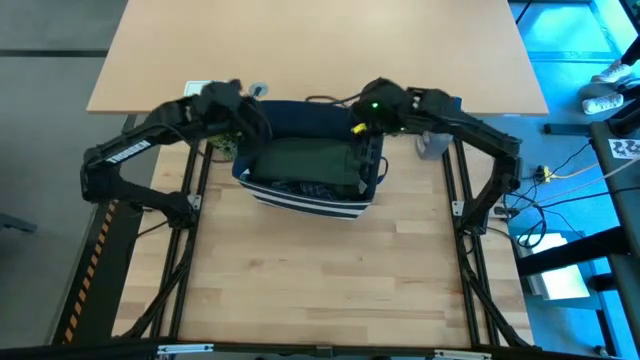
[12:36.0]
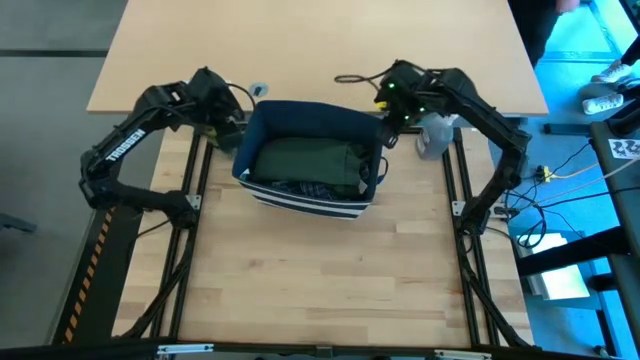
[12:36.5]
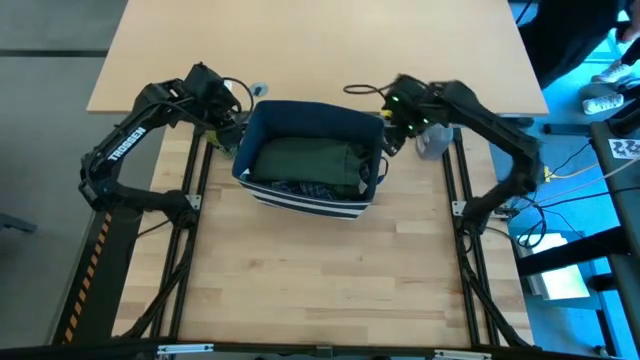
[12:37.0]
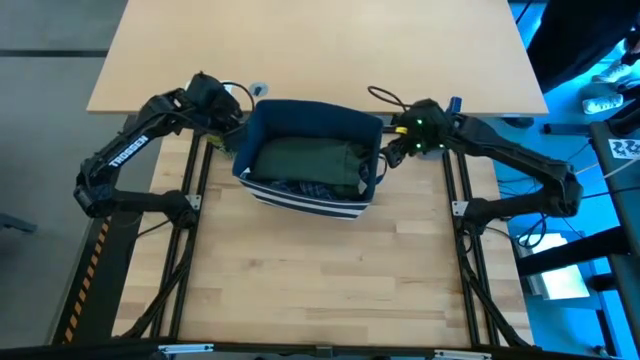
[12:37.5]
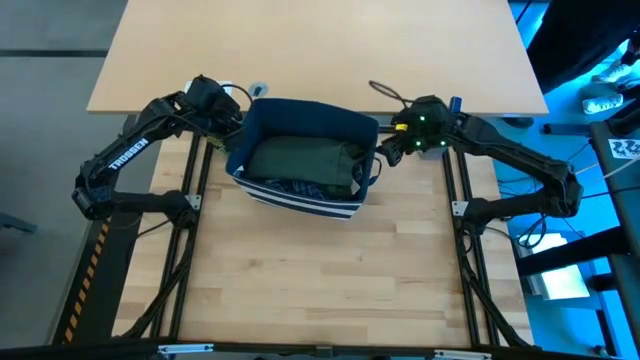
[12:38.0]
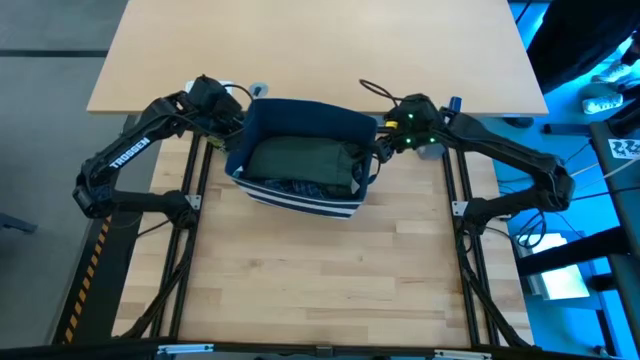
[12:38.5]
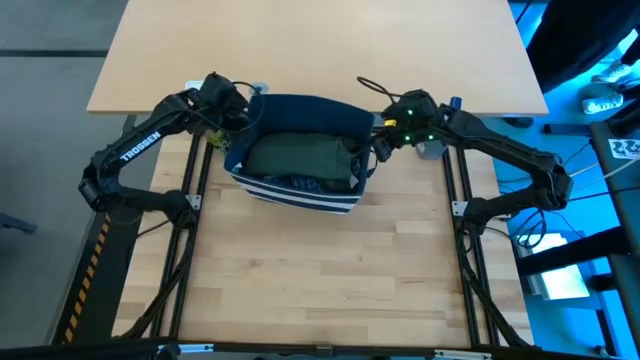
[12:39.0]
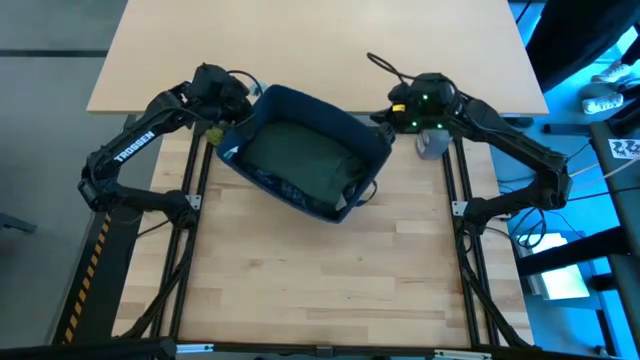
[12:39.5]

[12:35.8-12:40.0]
Task: Fold Laundry from Bin
Move the laundry bin to the other table

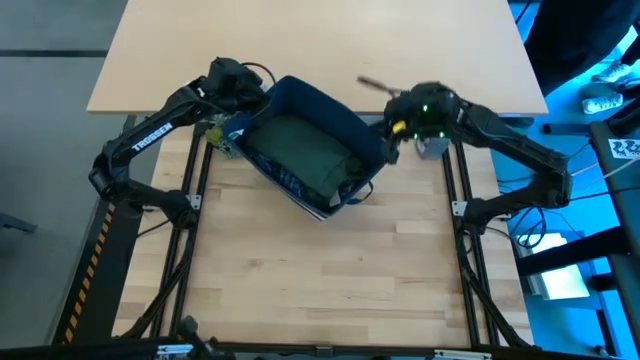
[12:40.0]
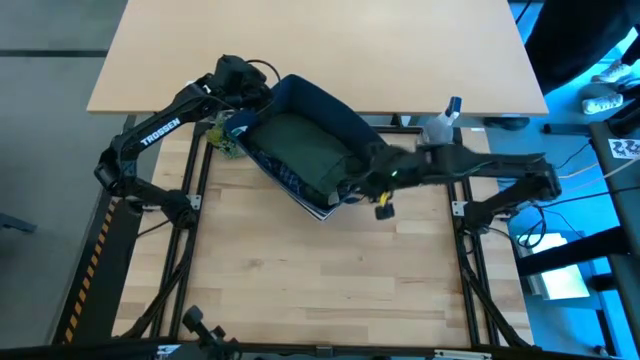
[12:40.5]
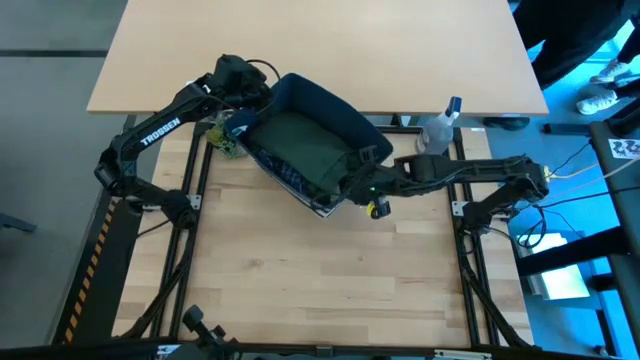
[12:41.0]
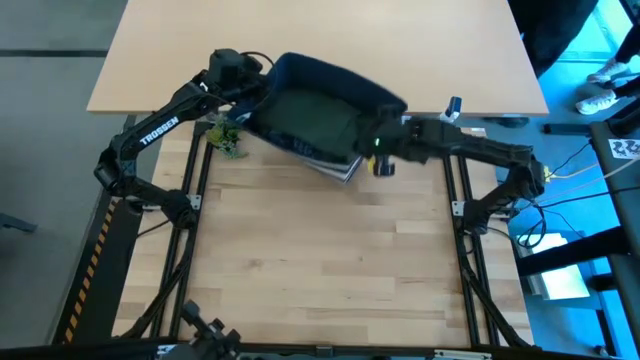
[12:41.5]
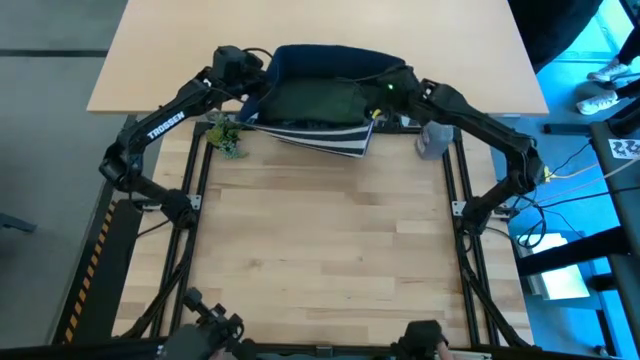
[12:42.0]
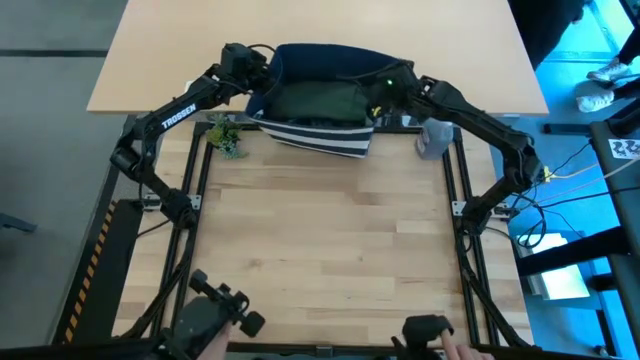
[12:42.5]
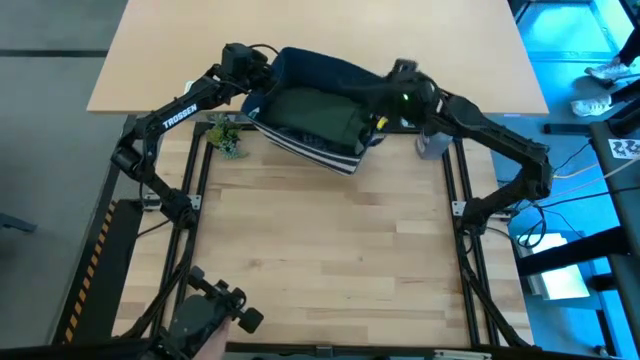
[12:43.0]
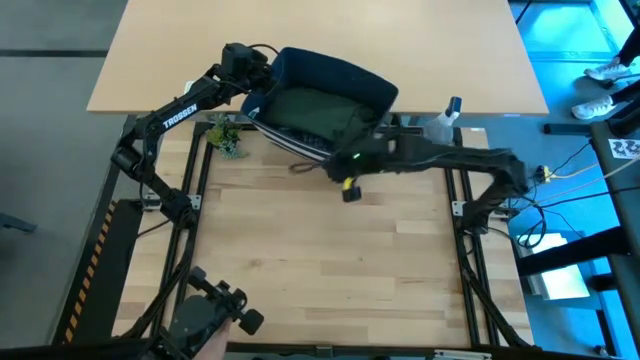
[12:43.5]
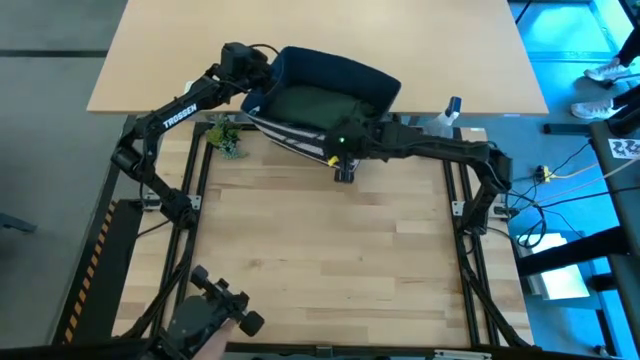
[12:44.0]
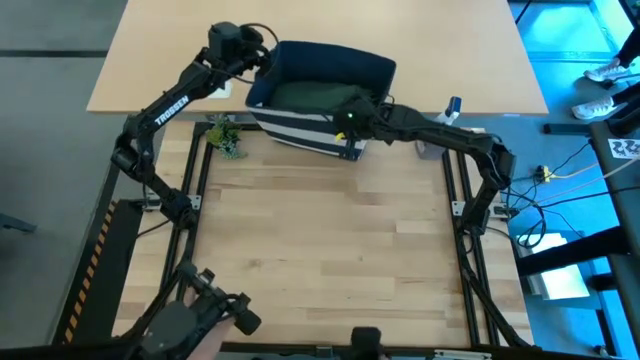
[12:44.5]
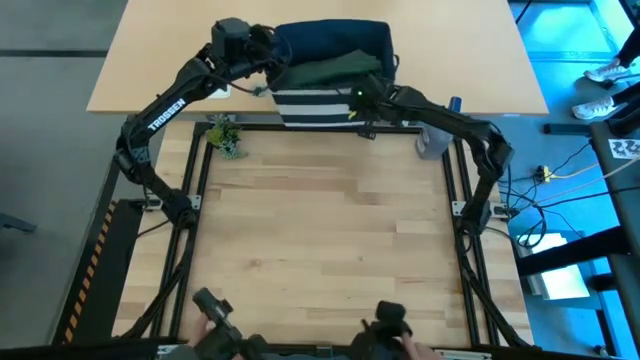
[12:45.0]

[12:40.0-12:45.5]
Move the laundry bin to the other table

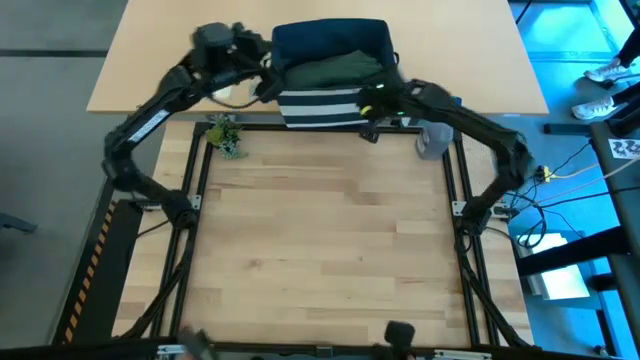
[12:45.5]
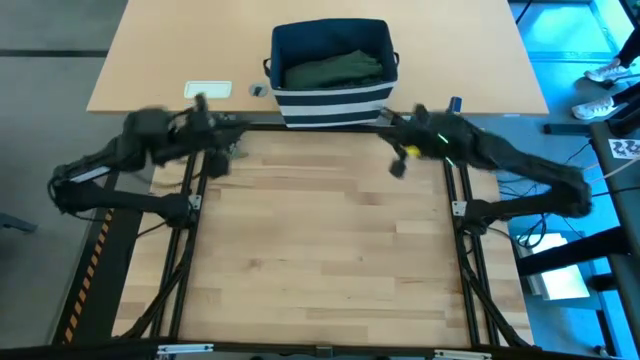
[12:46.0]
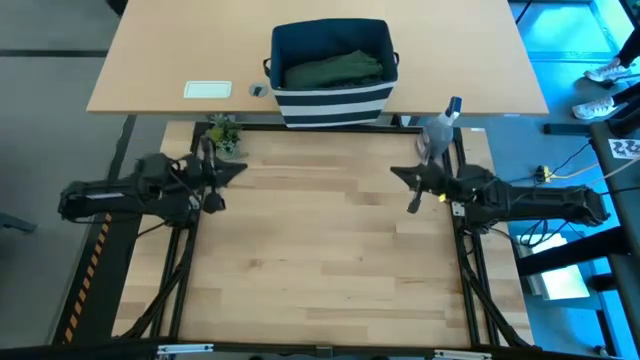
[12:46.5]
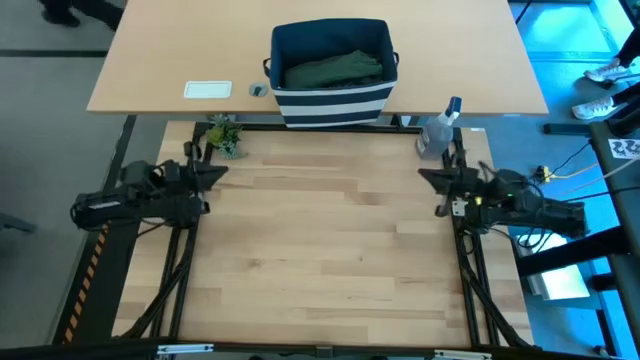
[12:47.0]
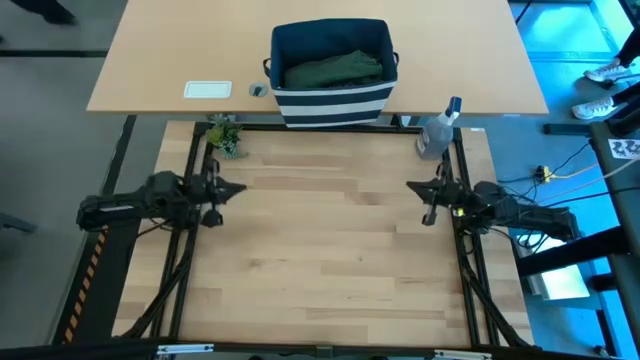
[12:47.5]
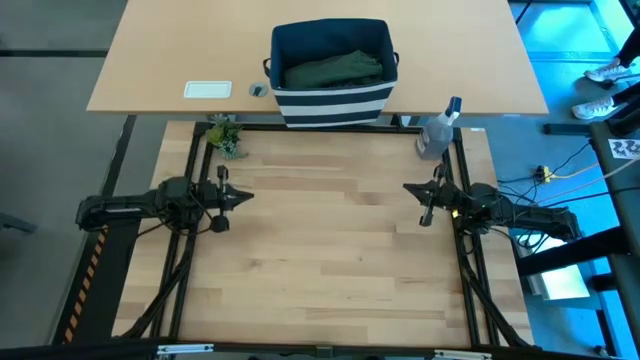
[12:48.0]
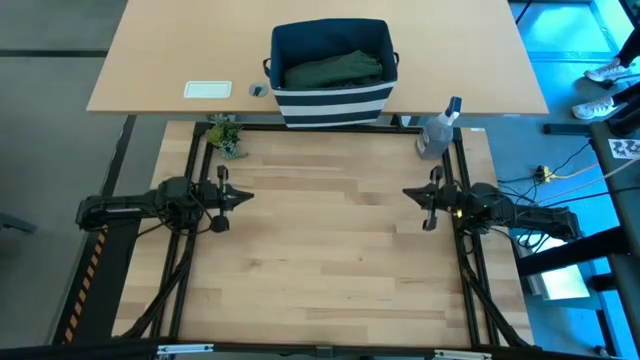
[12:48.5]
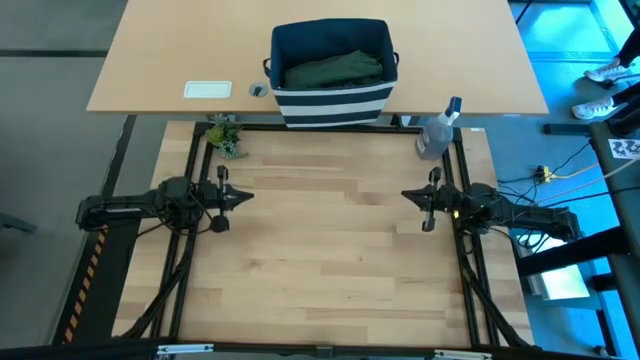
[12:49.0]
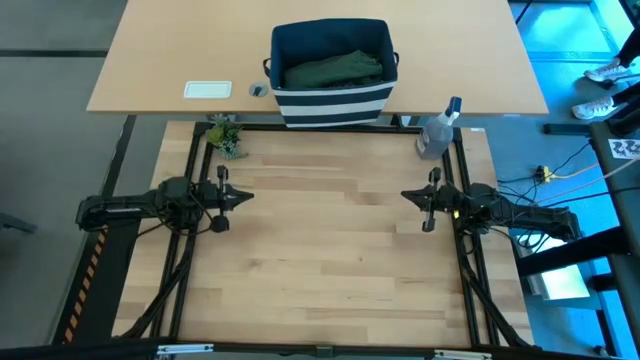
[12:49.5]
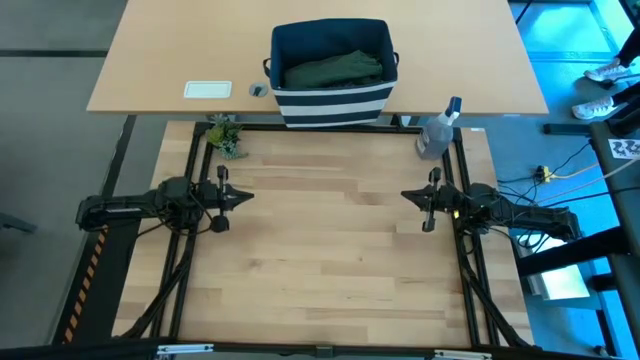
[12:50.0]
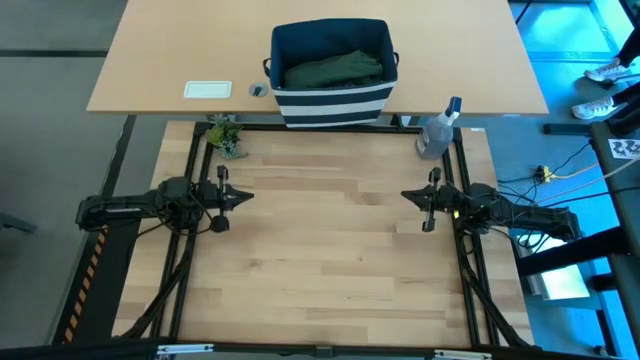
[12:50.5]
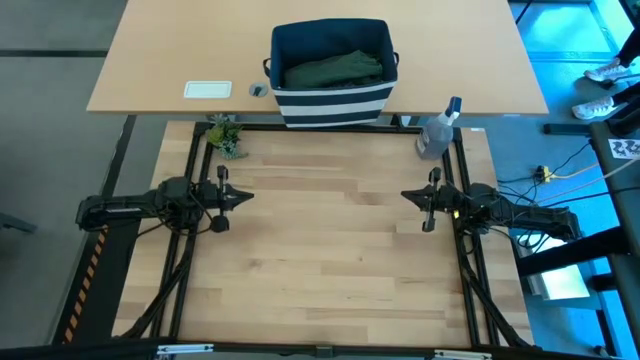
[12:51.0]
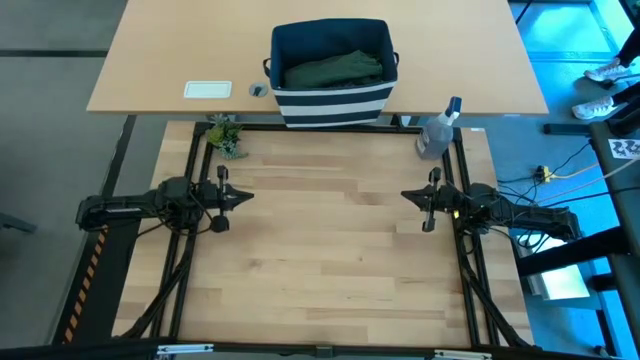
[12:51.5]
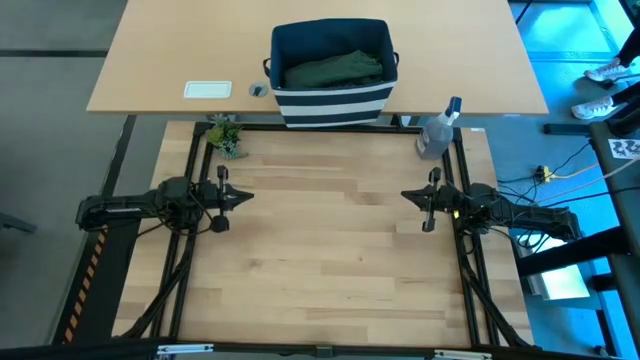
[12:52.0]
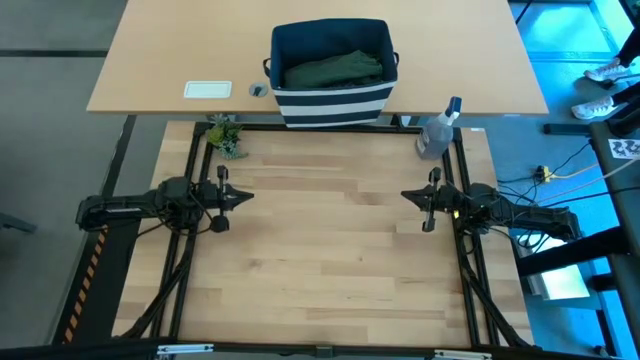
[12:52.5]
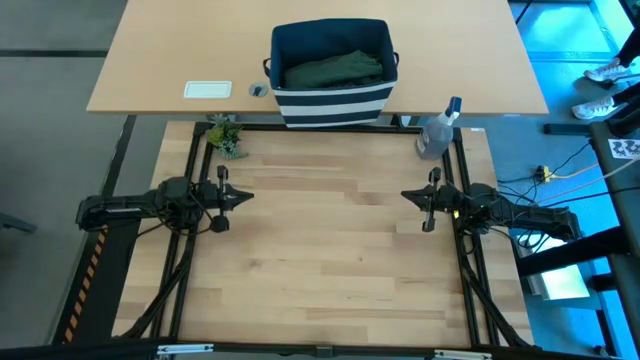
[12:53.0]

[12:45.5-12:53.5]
Return to Home Position

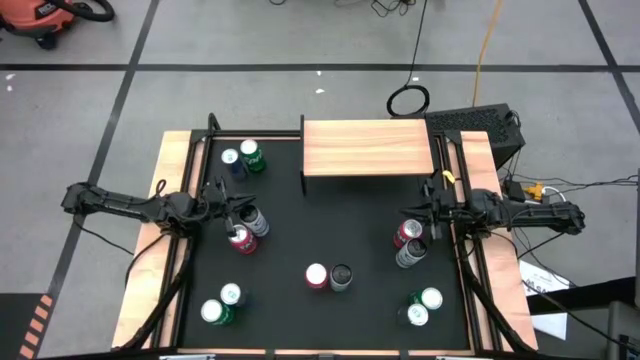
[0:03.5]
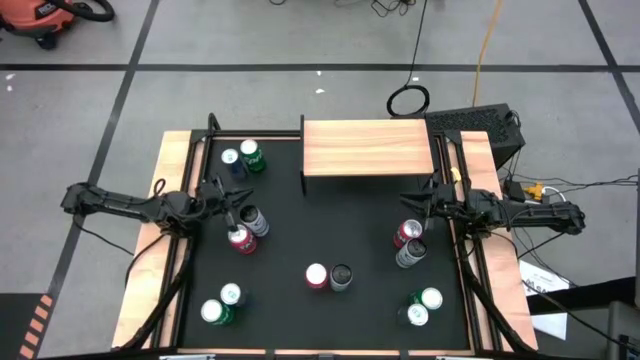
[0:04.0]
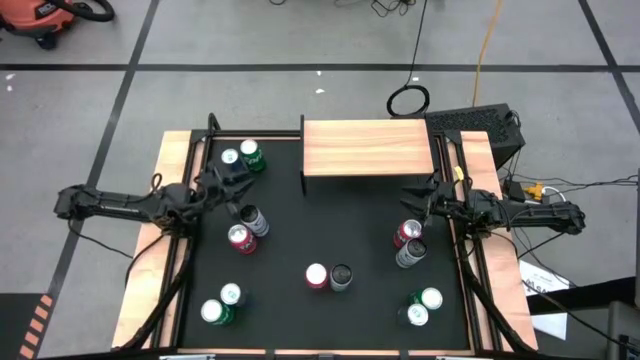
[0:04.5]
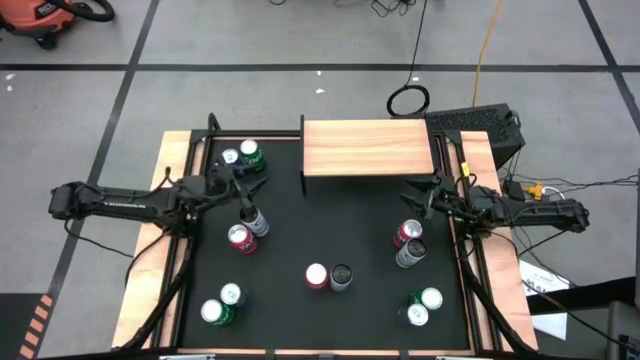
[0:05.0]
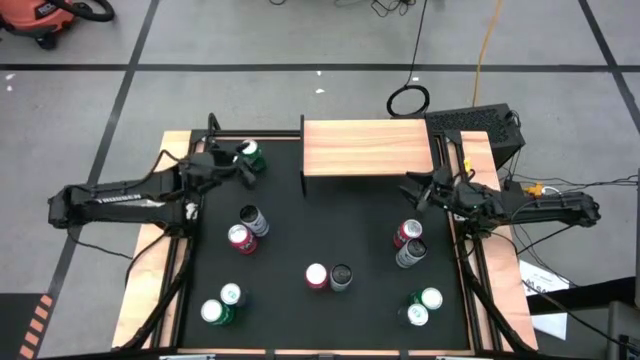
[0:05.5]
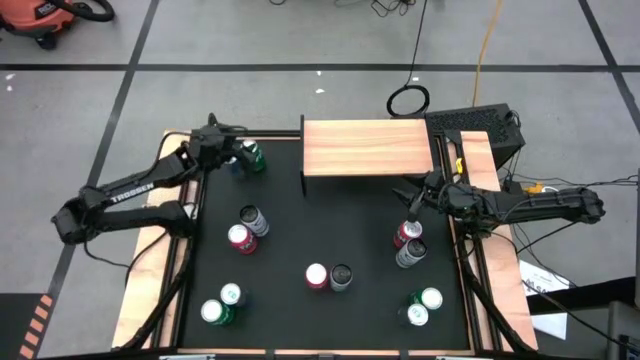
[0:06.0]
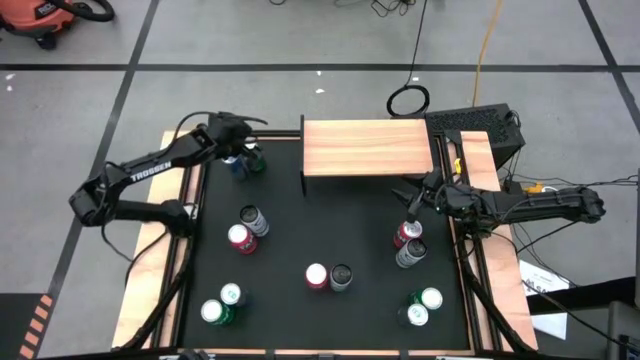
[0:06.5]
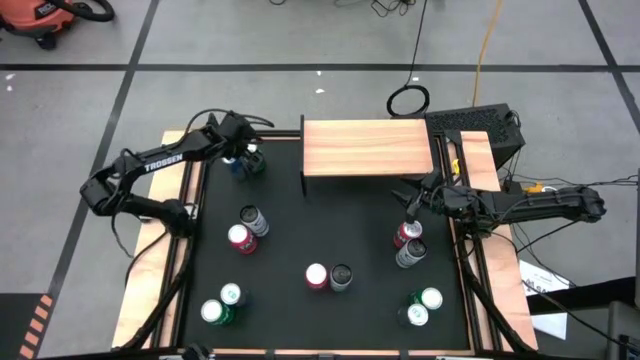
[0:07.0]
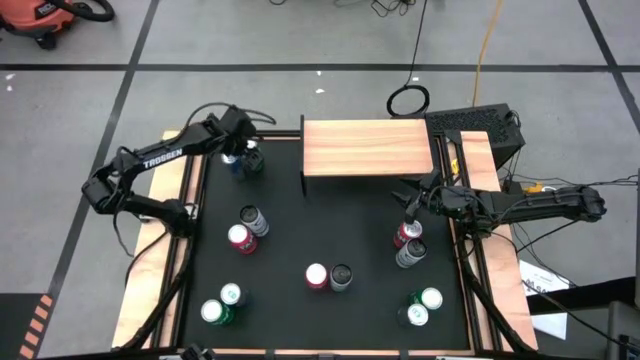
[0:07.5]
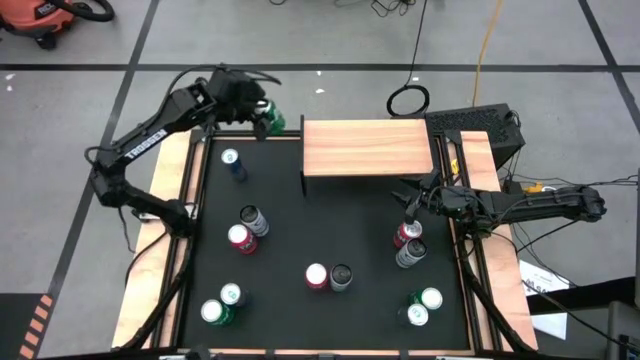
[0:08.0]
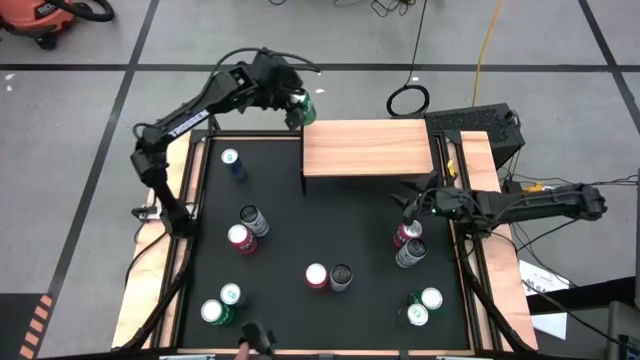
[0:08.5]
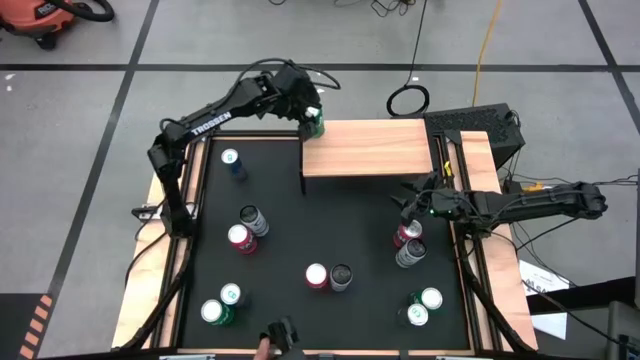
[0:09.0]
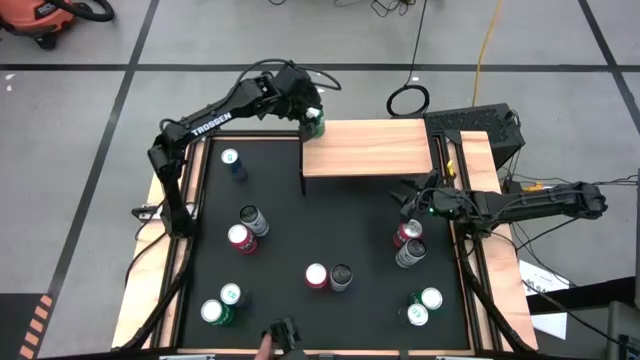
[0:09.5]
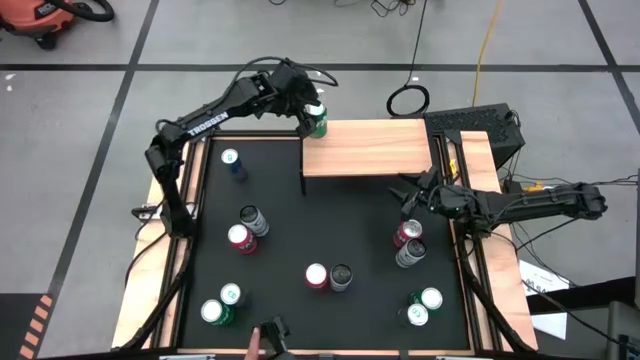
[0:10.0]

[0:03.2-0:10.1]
Task: Place canned beverage on shelf
Put the top left green soda can on the shelf
